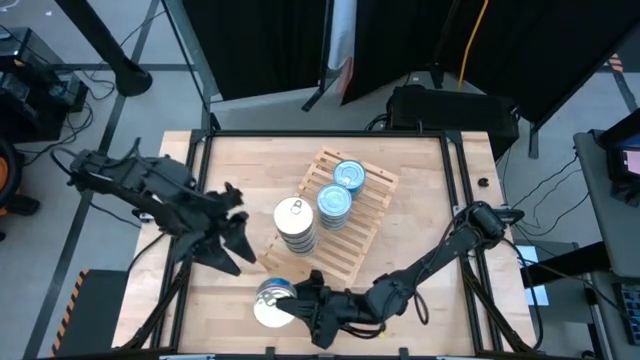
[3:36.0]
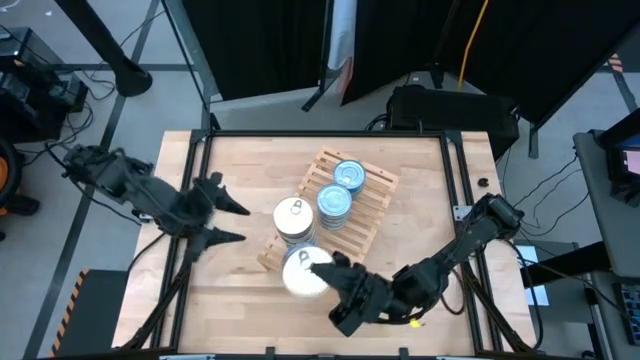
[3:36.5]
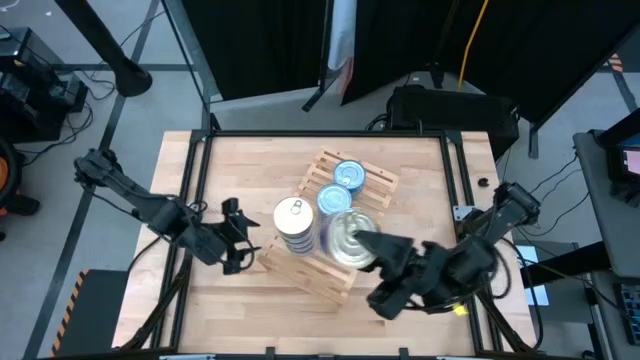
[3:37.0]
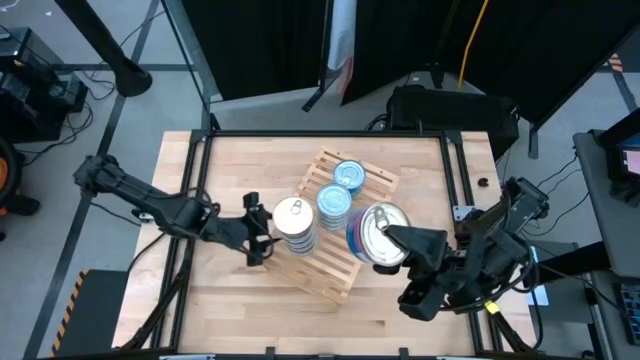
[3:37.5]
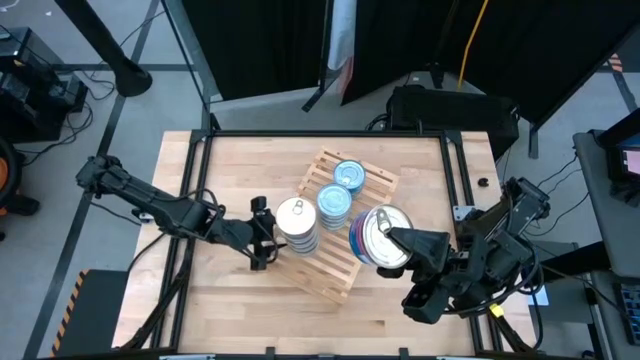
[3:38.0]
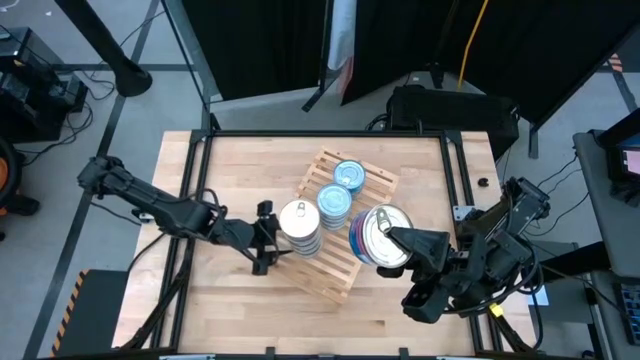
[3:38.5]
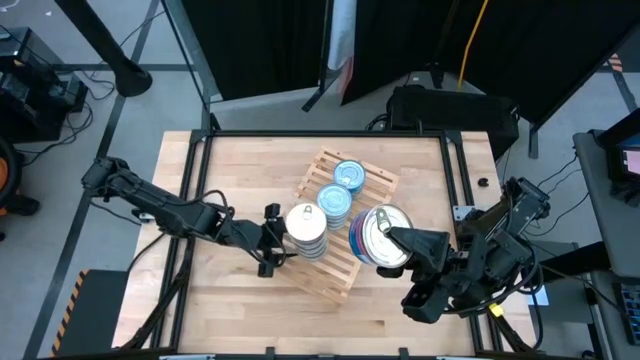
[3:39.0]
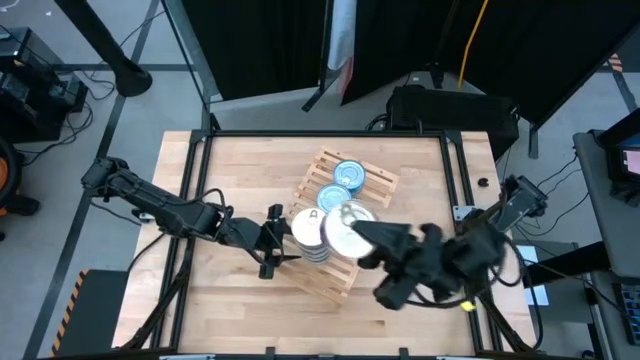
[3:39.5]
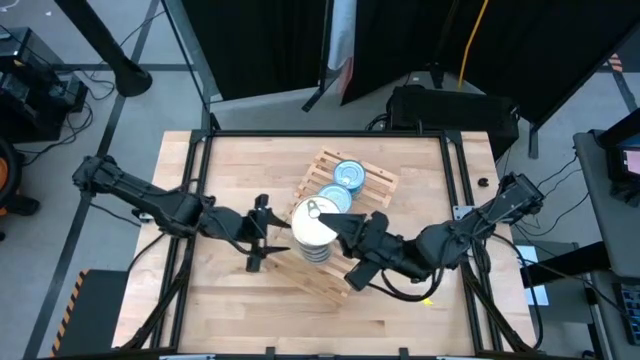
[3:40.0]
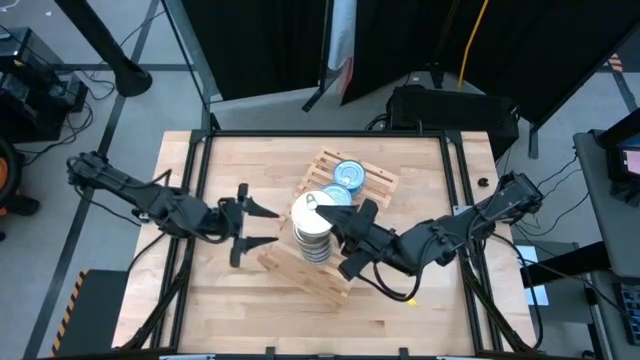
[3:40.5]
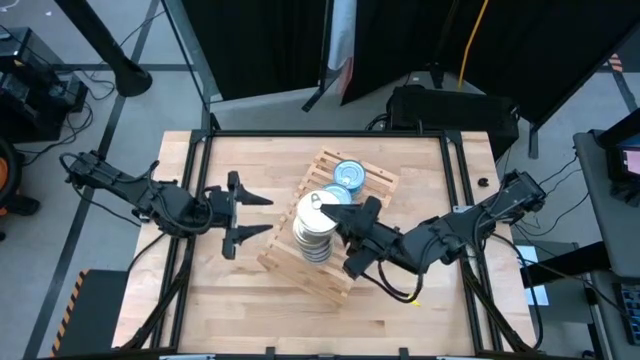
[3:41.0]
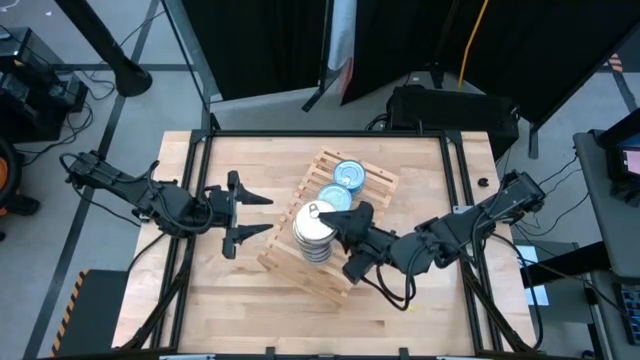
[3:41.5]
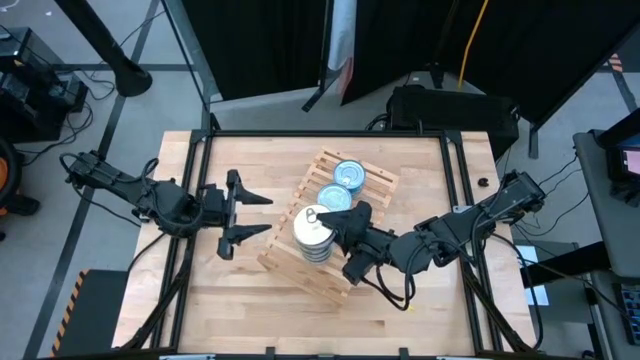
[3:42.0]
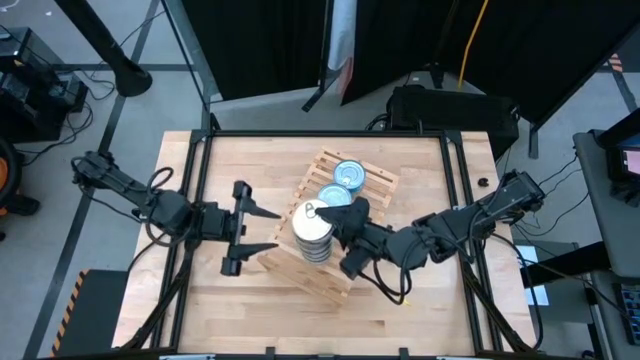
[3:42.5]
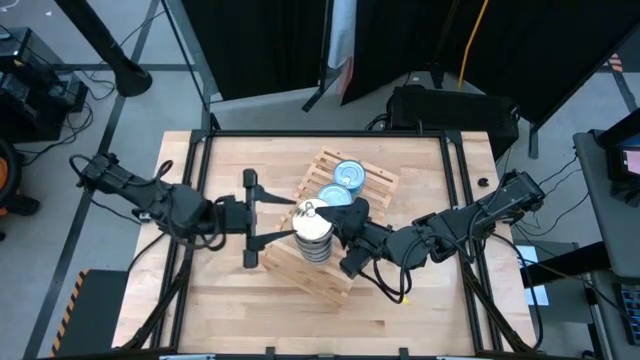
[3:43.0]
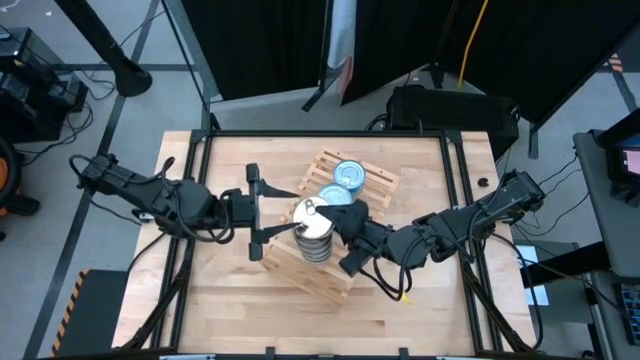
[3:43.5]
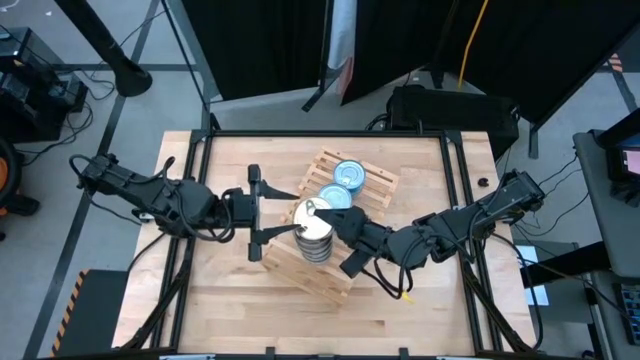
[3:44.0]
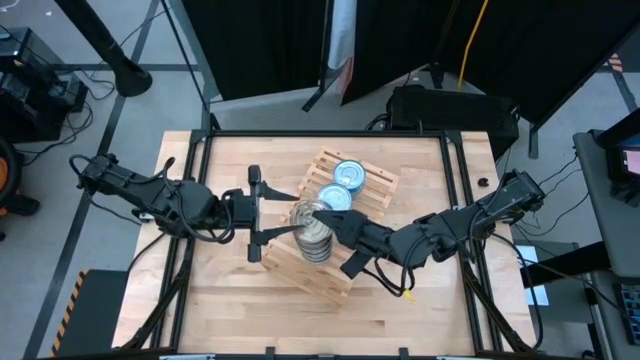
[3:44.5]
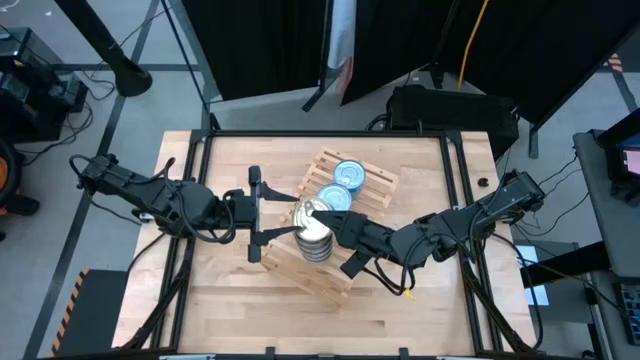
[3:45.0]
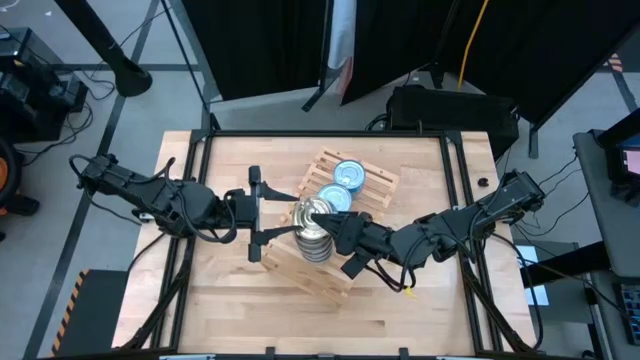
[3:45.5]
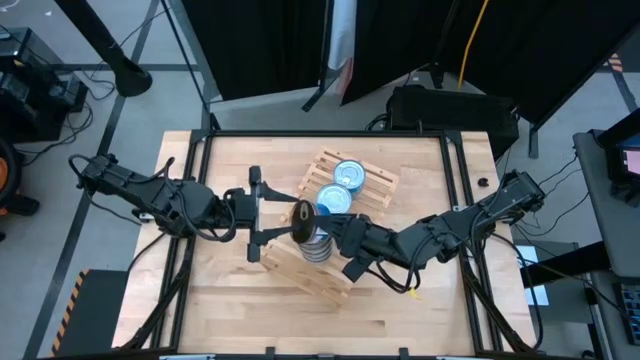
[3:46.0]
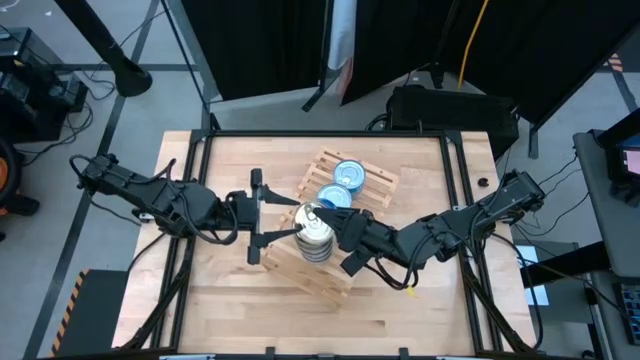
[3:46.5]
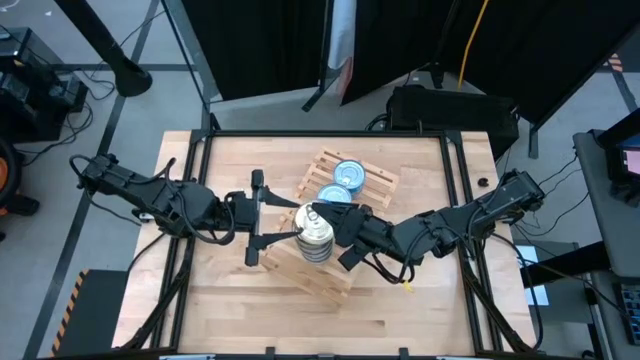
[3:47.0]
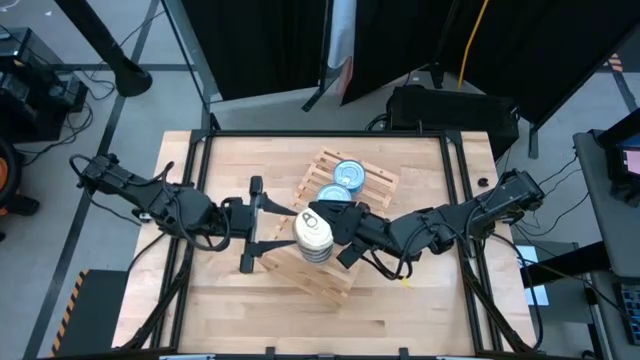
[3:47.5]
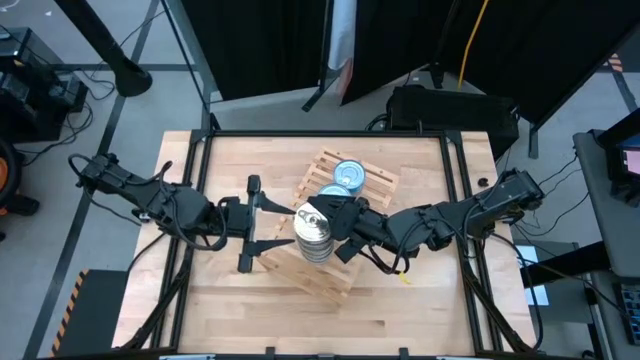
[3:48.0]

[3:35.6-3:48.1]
Task: Stack canned seafood by type on shelf
Stack the blue-pink tuna can on top of the other blue-pink tuna can on the shelf

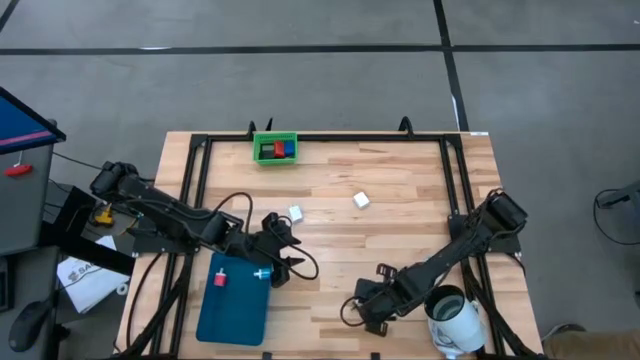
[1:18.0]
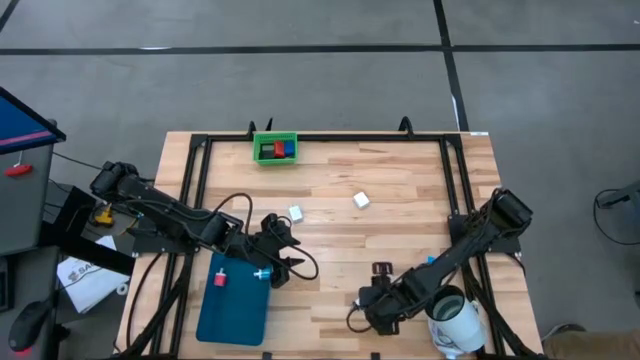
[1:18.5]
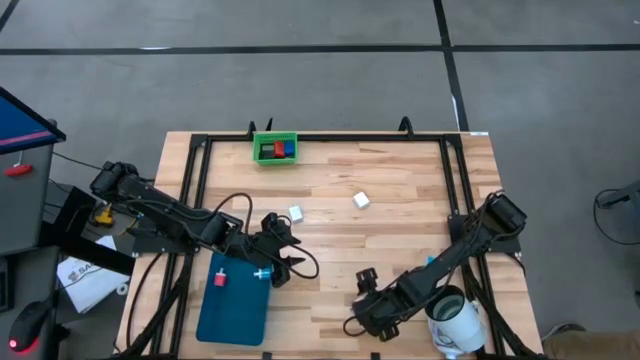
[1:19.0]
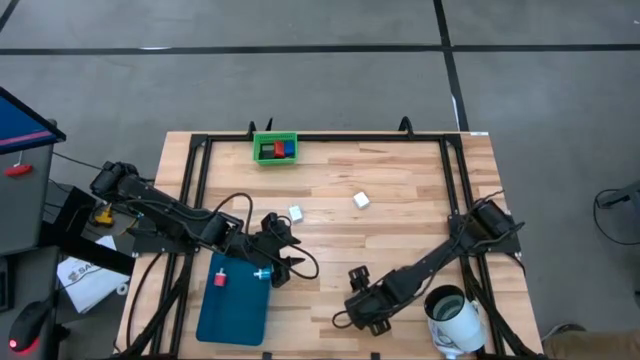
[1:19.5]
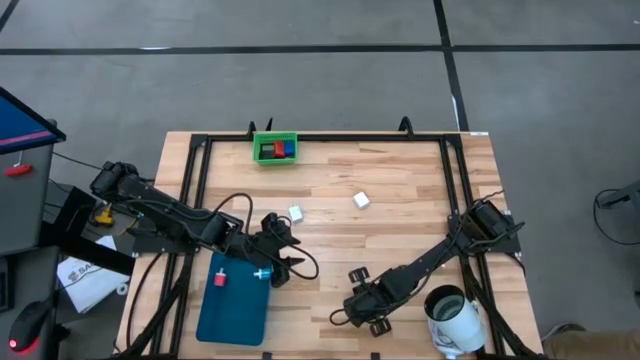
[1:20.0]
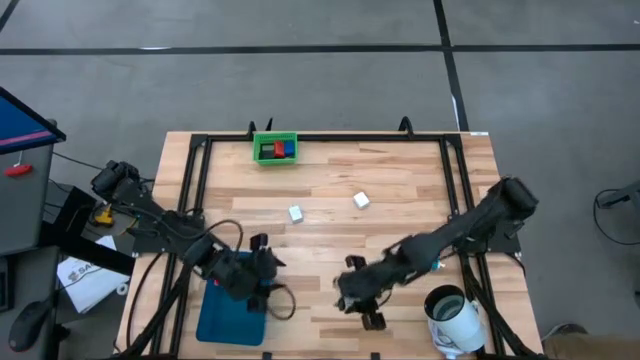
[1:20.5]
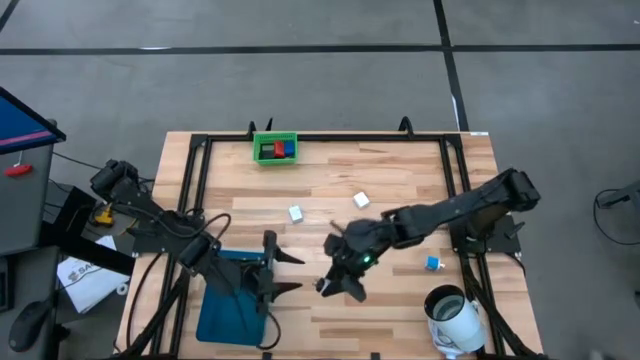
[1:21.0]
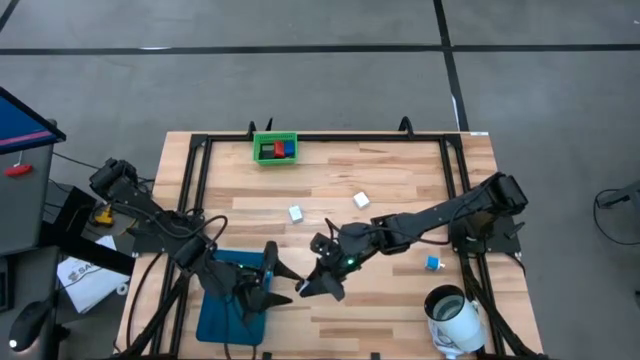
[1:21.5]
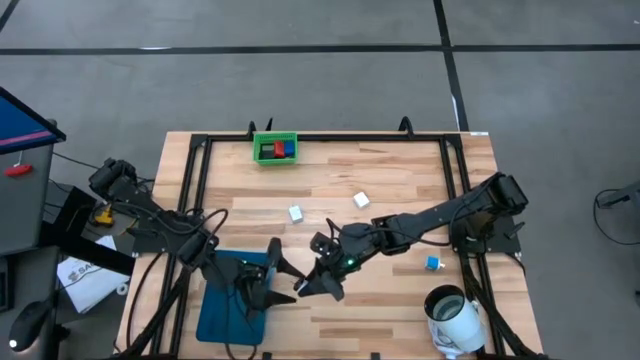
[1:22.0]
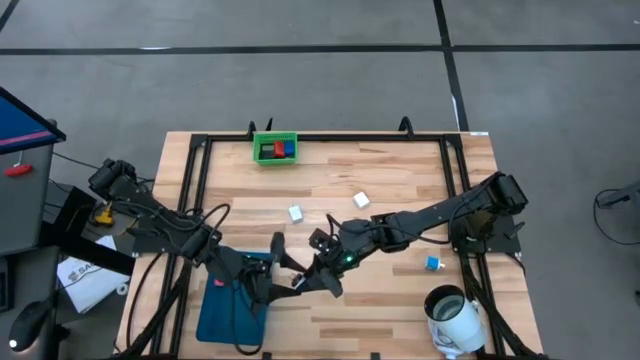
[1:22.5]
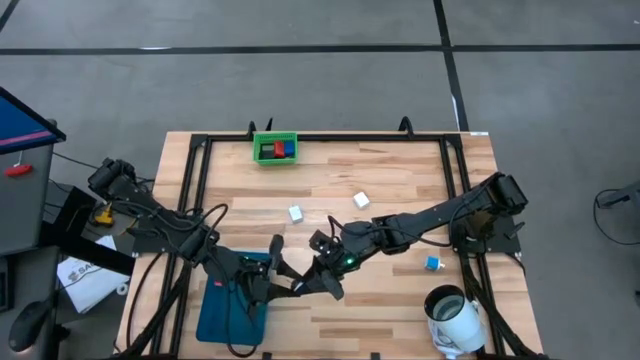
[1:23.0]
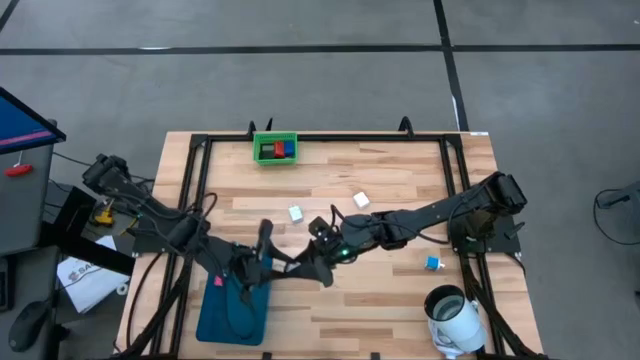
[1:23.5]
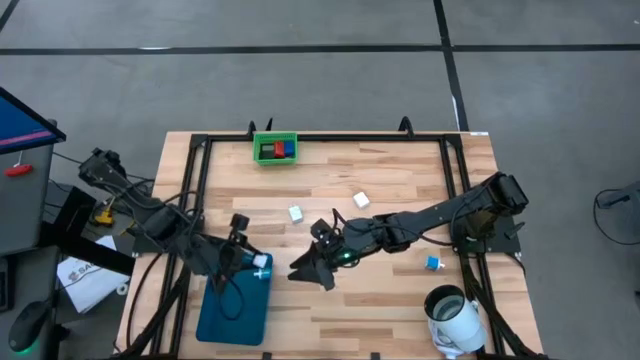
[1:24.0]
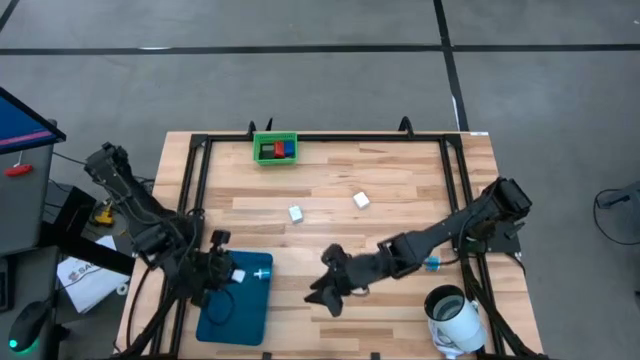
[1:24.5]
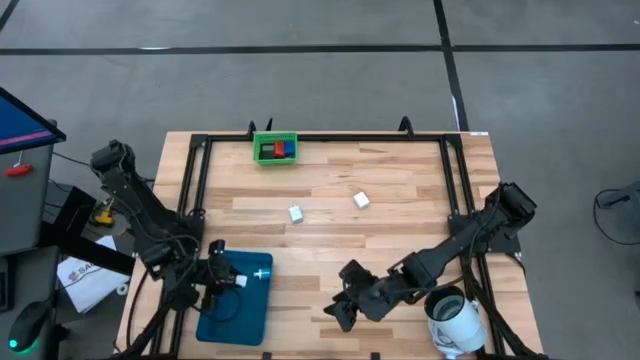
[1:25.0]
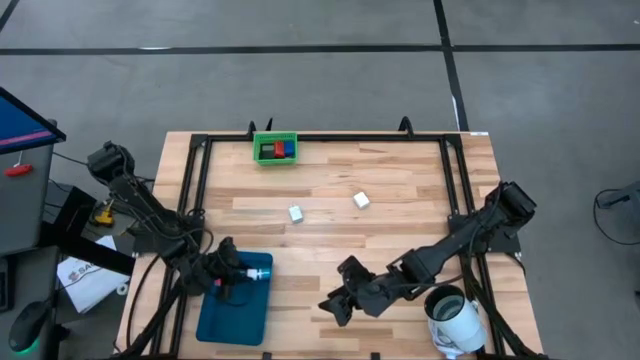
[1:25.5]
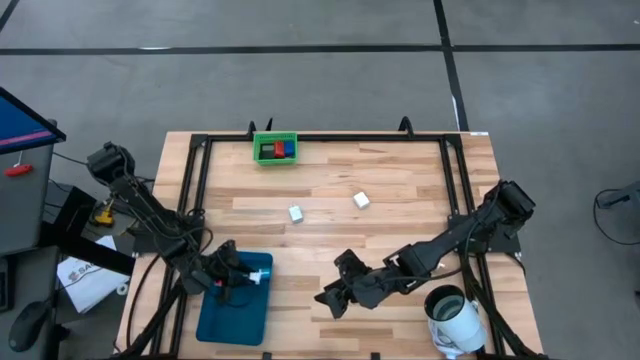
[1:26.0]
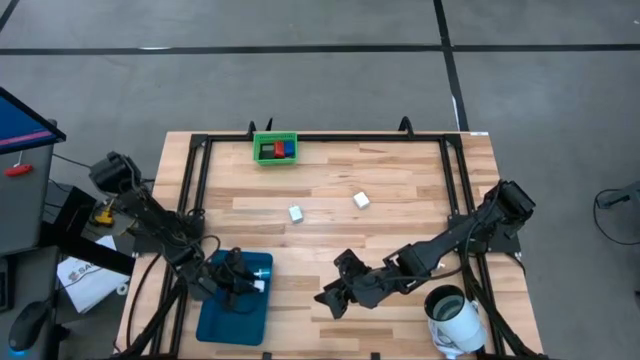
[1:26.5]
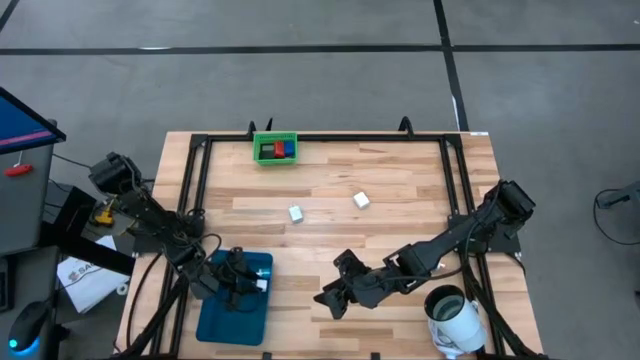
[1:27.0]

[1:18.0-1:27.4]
Task: Pick & Place Office items
Put the white and black charger adapter into the blue bin
